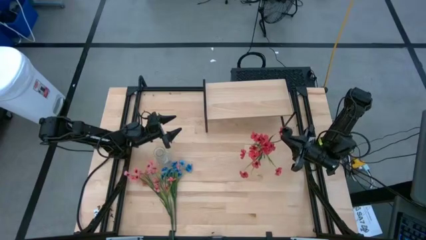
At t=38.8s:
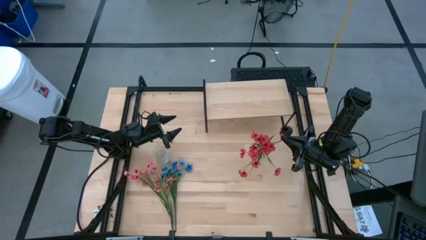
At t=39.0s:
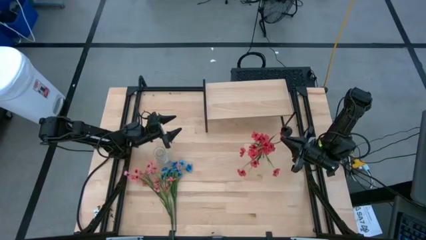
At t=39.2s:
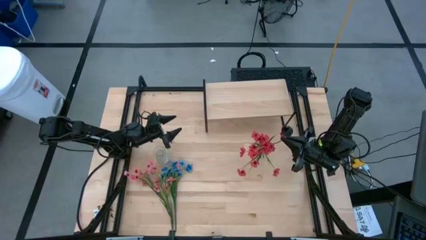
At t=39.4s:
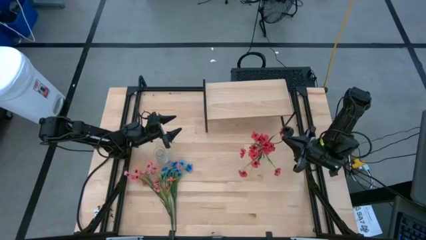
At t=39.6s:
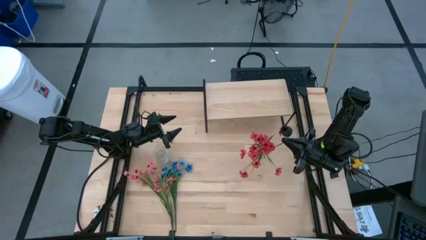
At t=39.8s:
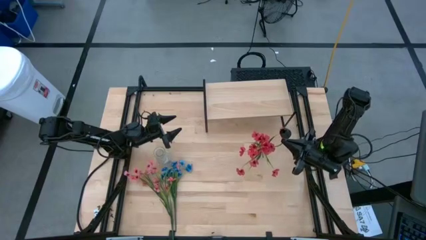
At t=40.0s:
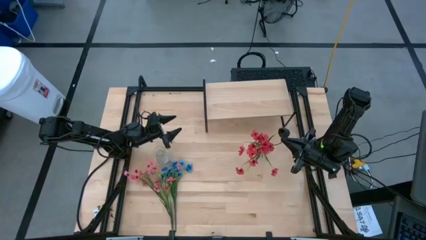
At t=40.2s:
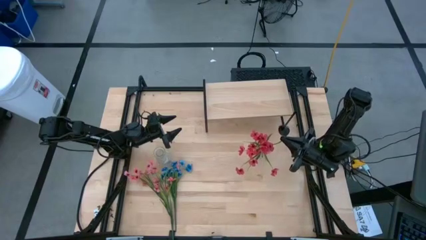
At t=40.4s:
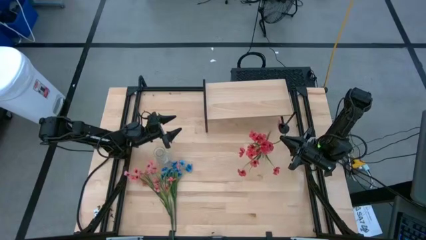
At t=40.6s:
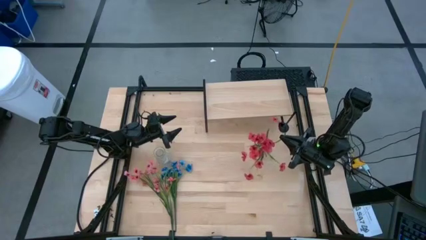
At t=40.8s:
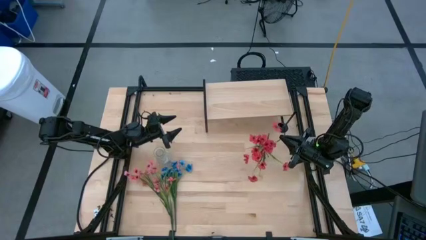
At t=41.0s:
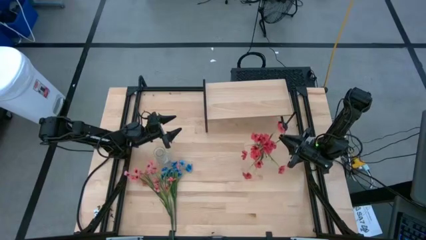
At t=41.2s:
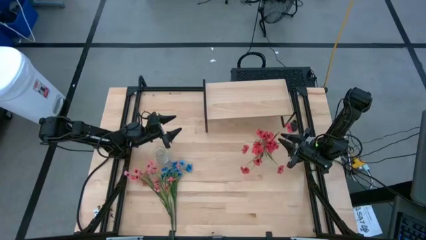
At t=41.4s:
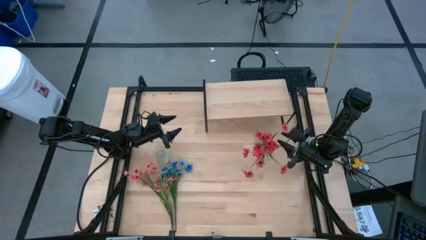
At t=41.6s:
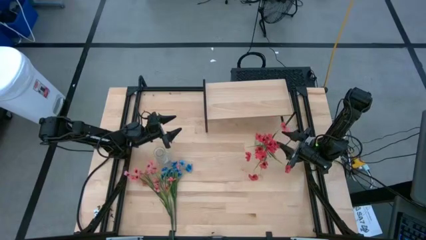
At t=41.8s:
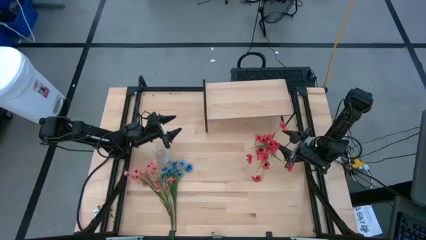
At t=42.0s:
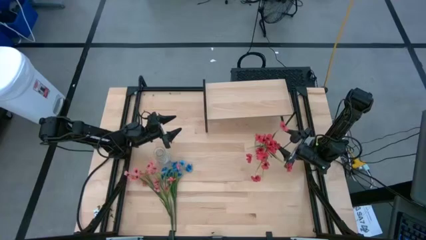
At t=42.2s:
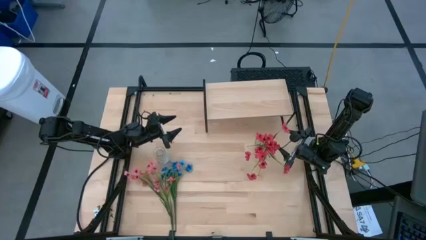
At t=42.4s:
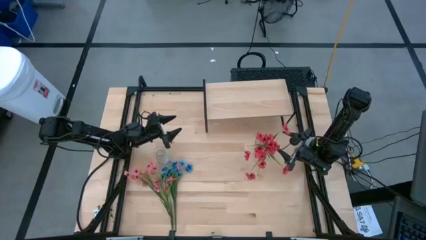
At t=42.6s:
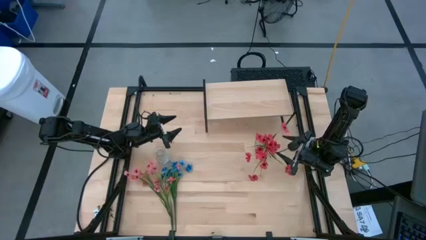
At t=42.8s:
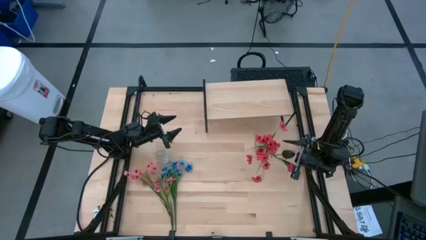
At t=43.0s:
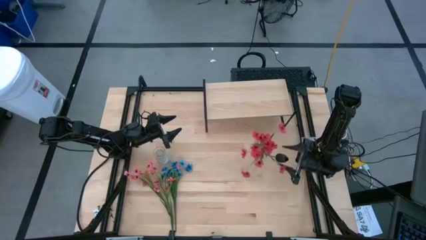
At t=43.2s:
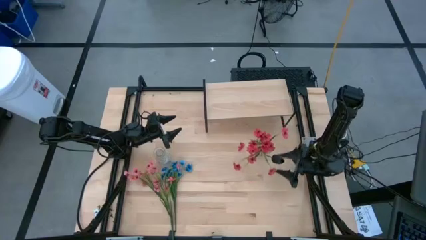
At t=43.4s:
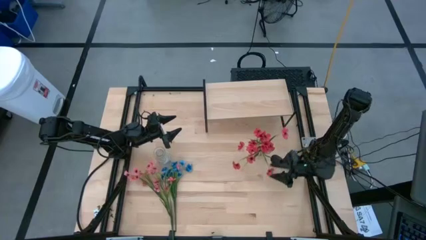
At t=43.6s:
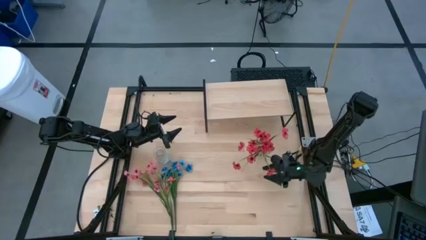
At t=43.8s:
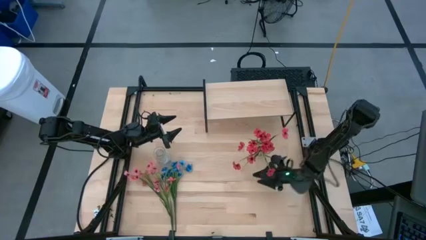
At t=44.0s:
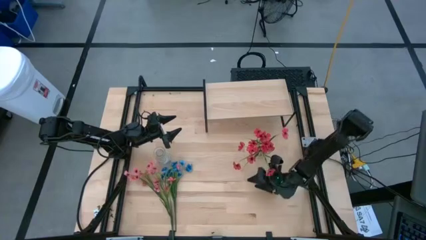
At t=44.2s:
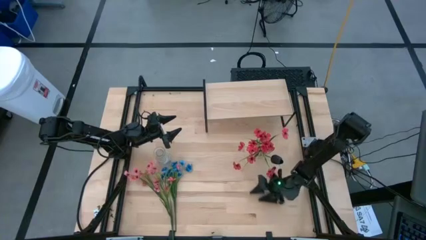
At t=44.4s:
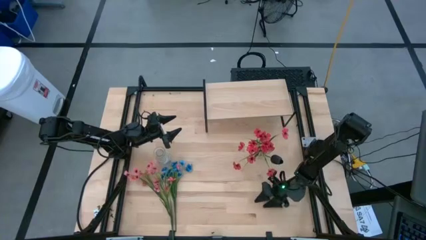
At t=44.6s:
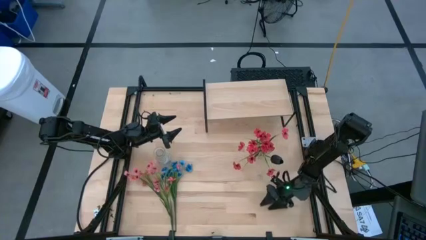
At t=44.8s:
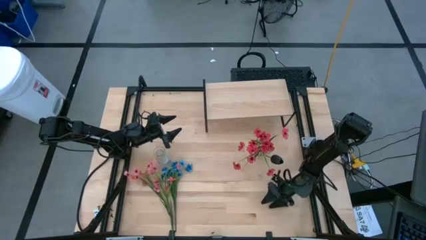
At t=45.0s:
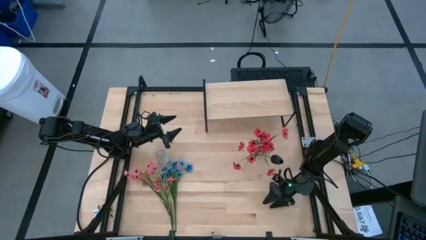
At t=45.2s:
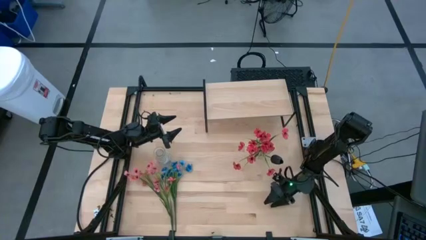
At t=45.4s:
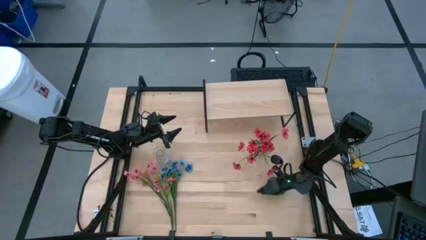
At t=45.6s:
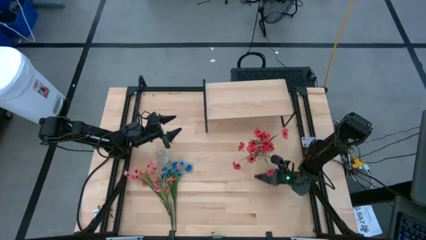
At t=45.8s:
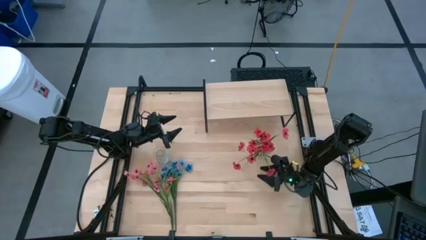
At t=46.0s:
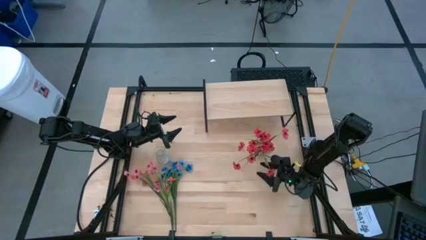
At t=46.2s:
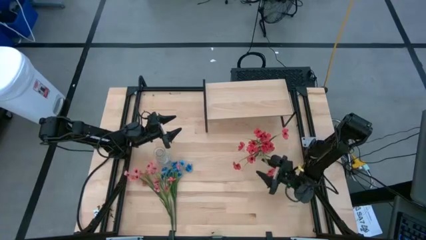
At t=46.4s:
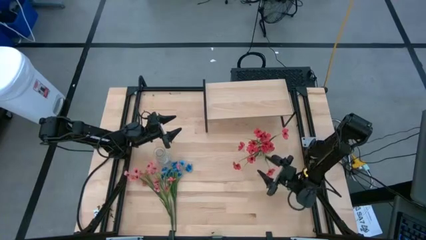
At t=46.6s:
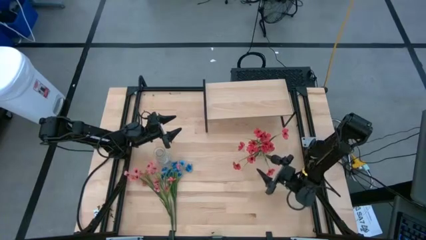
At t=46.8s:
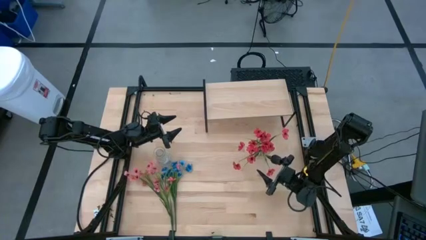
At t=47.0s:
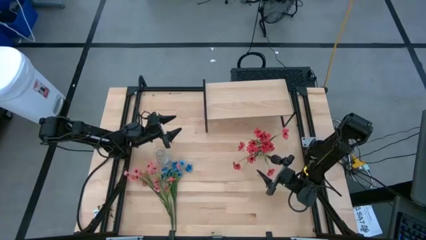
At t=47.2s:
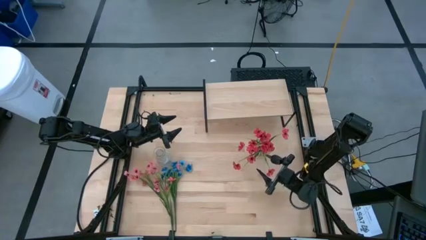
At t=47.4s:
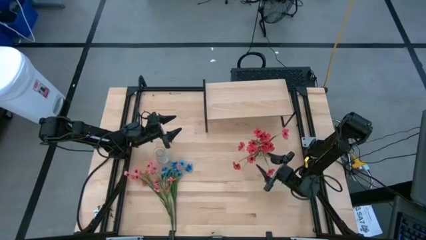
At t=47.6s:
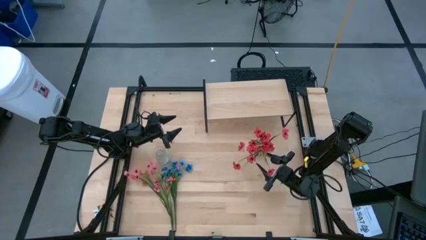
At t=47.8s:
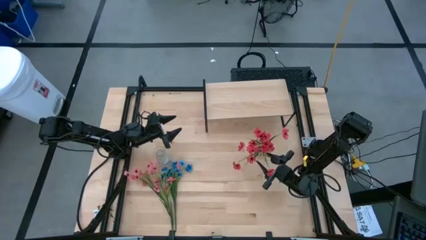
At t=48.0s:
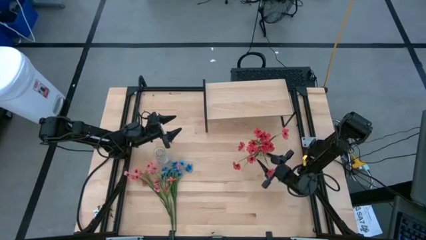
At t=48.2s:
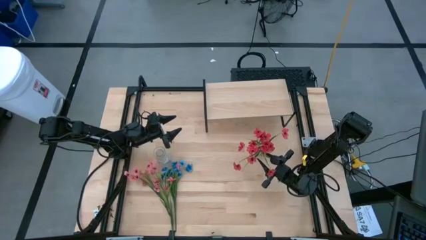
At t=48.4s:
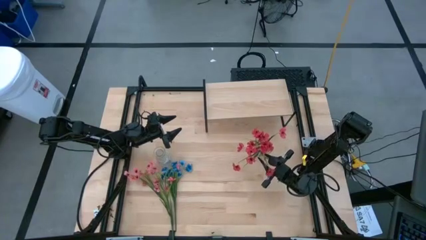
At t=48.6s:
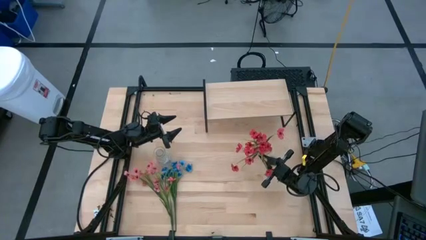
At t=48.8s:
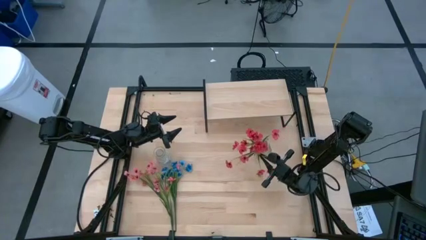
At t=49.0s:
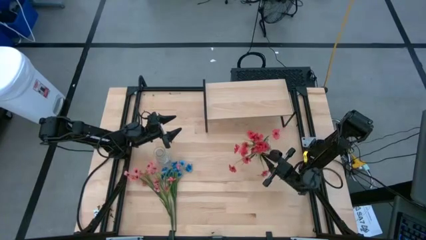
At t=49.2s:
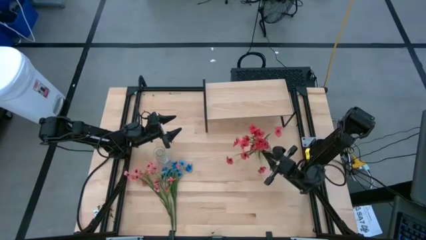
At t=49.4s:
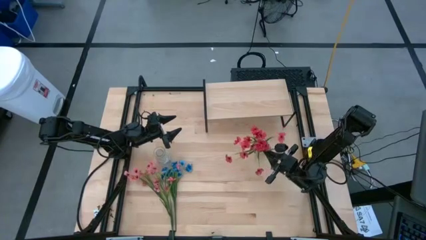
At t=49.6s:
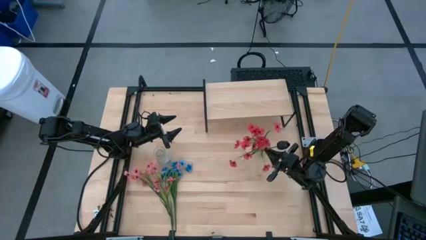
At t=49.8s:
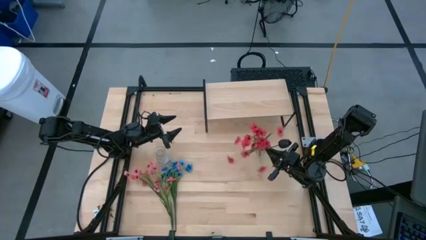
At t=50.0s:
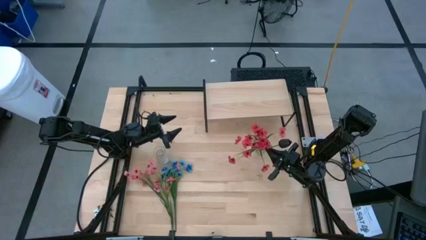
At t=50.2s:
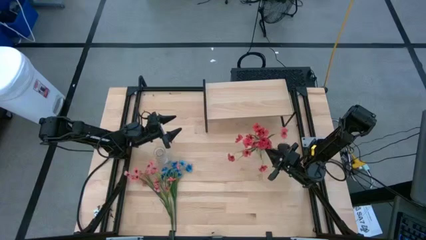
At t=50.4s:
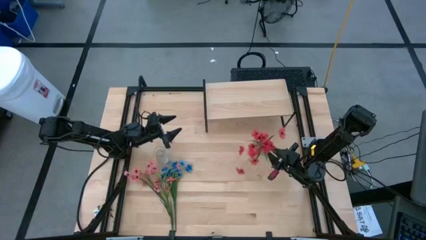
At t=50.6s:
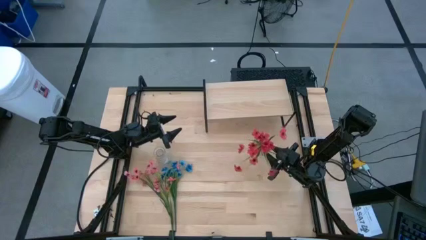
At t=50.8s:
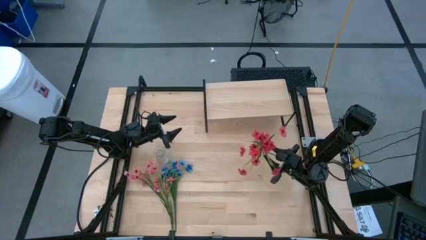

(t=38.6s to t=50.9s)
Task: Pick and place flowers into a vace then onto a shelf
Put the black tulip into the right transparent vase

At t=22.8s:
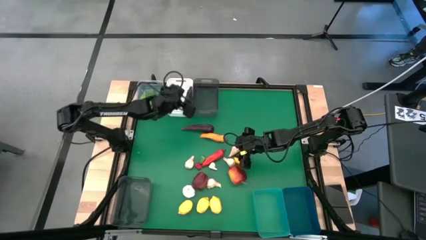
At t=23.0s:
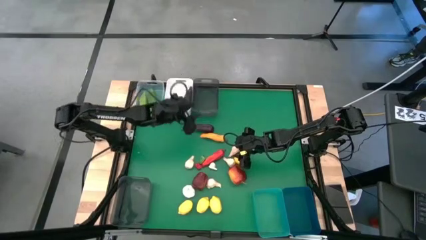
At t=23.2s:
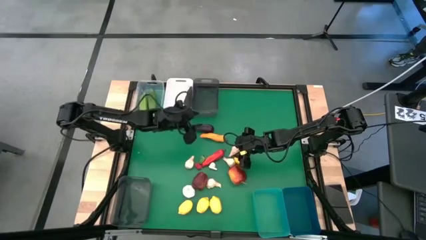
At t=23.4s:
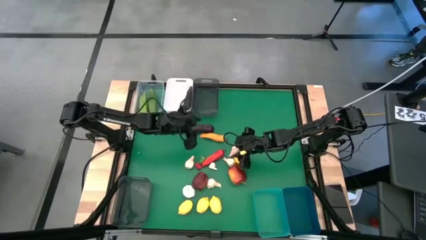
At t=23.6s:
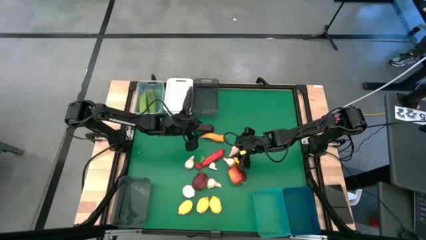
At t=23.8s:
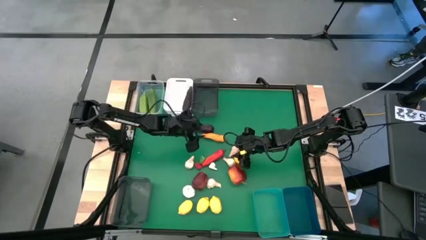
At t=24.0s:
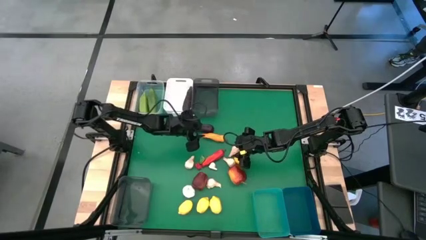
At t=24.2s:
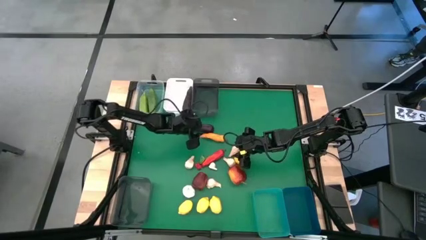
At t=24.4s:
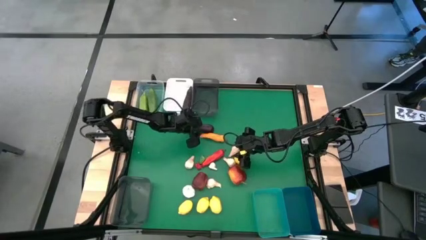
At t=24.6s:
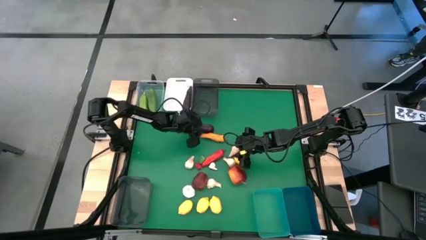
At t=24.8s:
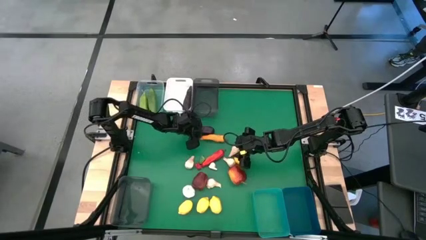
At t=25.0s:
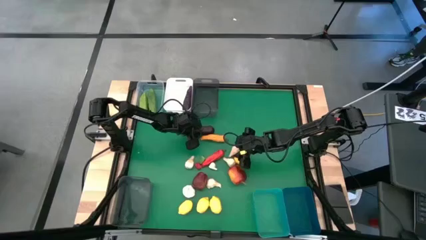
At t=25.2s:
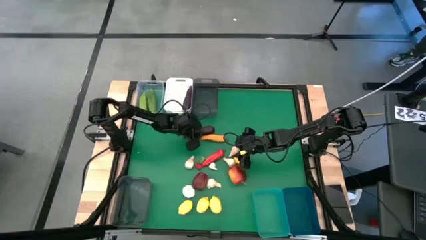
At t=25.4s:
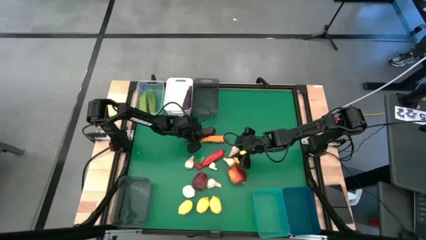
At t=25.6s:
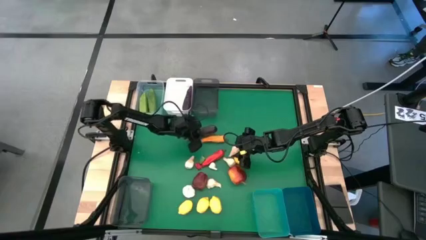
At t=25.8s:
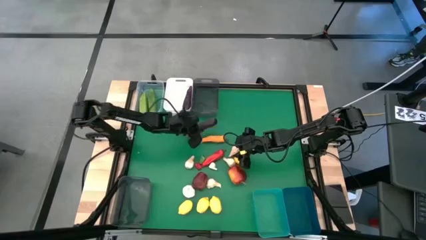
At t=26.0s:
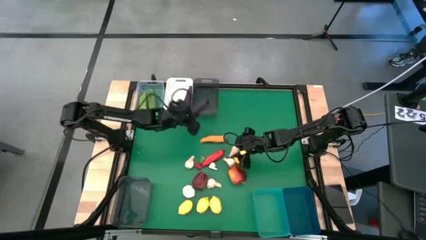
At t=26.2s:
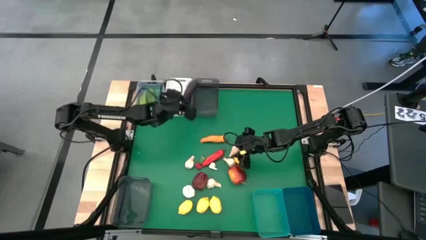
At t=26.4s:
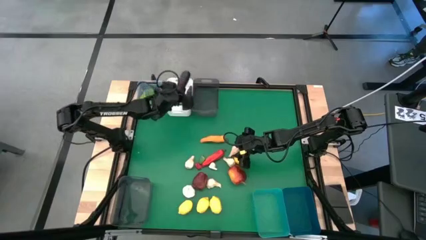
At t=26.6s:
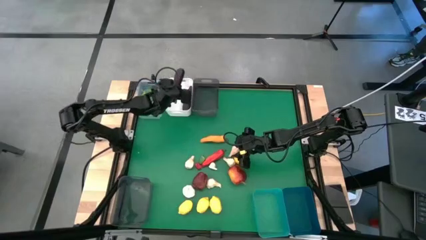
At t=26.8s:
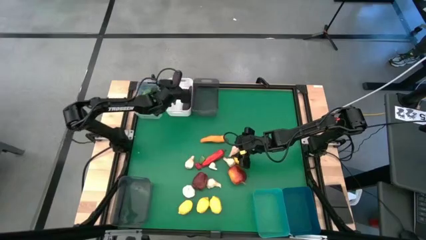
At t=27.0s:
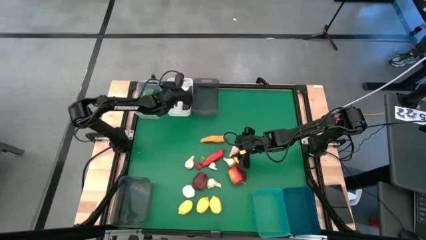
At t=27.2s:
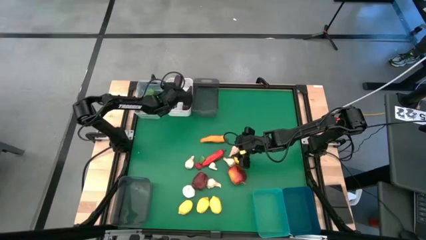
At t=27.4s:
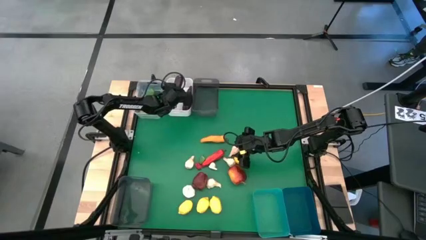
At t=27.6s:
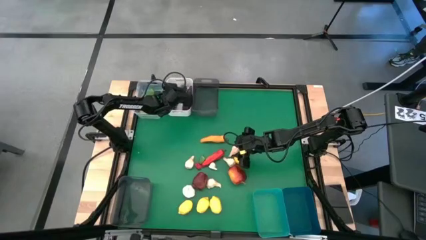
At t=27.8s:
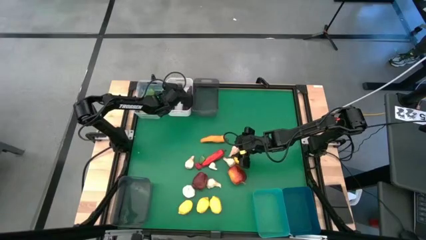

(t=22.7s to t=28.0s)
Task: Sort produce into baskets
Put the purple eggplant into the white bin
